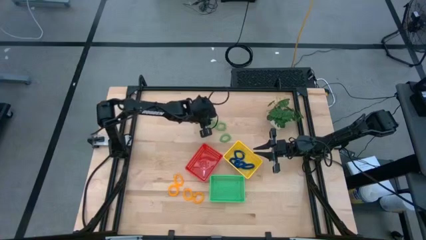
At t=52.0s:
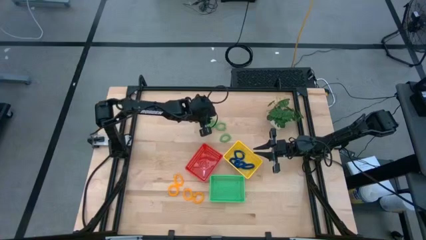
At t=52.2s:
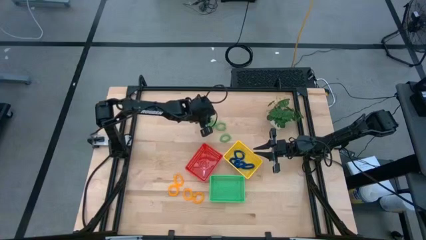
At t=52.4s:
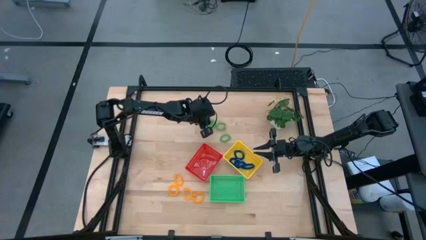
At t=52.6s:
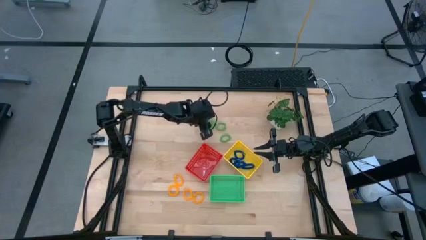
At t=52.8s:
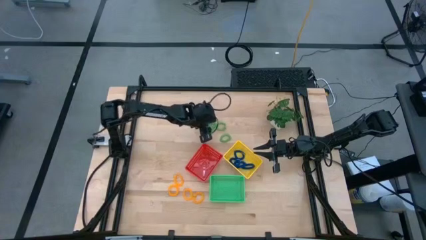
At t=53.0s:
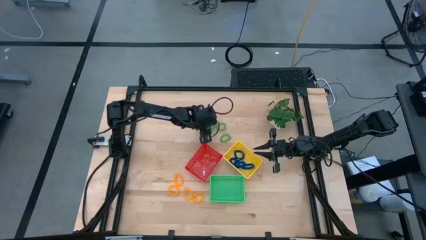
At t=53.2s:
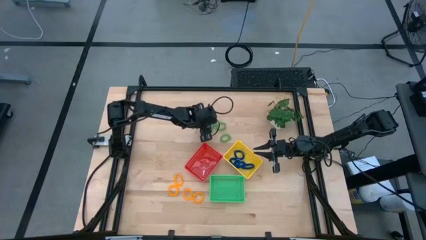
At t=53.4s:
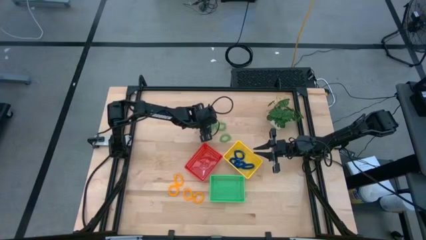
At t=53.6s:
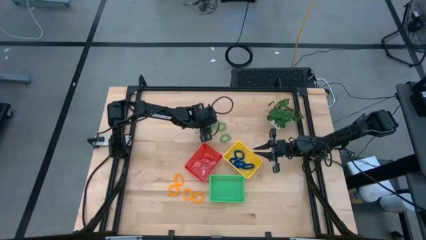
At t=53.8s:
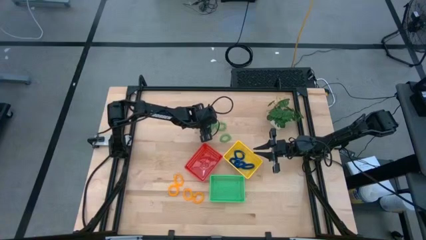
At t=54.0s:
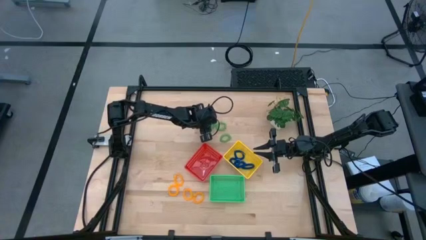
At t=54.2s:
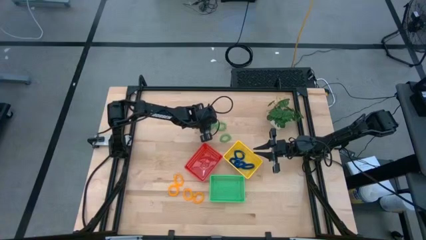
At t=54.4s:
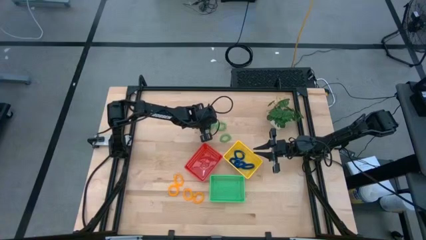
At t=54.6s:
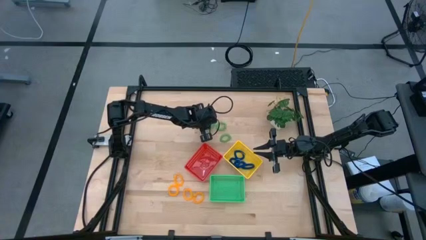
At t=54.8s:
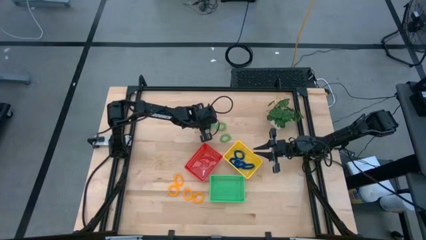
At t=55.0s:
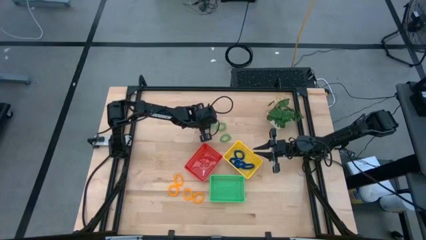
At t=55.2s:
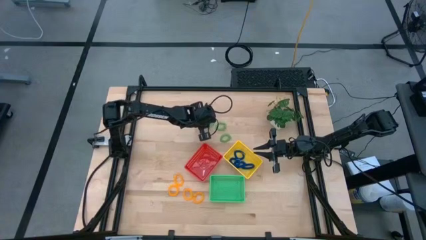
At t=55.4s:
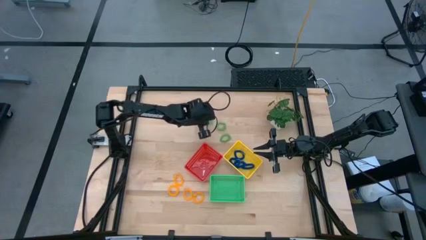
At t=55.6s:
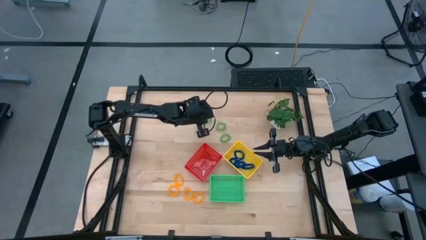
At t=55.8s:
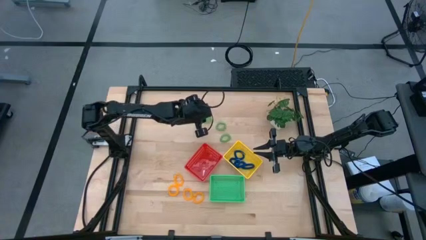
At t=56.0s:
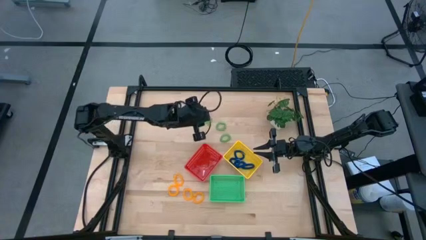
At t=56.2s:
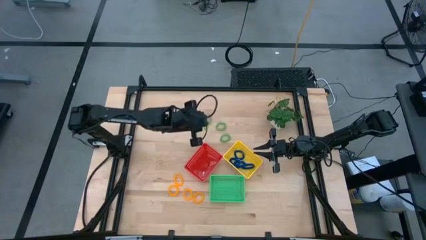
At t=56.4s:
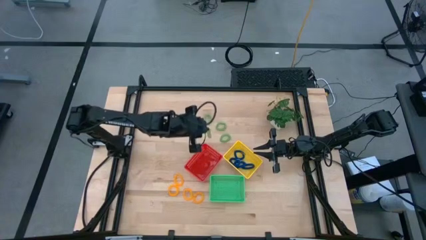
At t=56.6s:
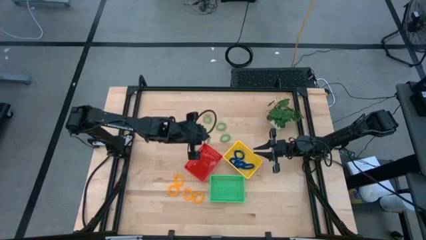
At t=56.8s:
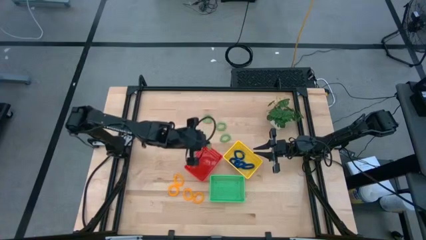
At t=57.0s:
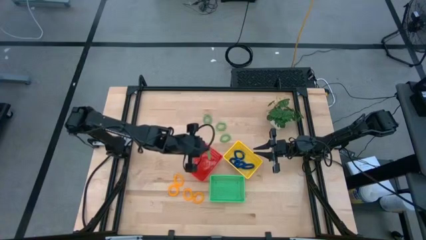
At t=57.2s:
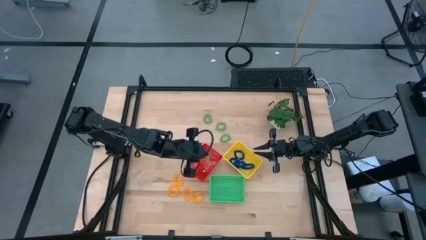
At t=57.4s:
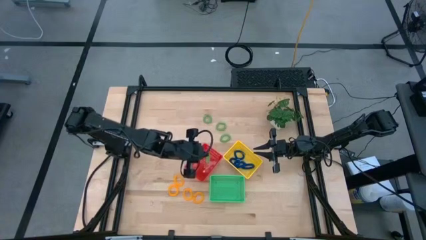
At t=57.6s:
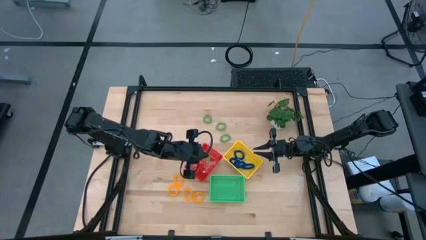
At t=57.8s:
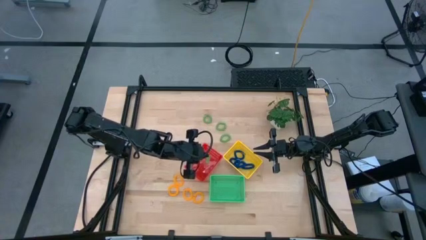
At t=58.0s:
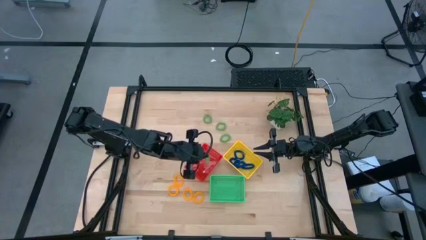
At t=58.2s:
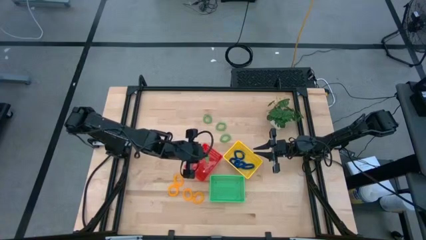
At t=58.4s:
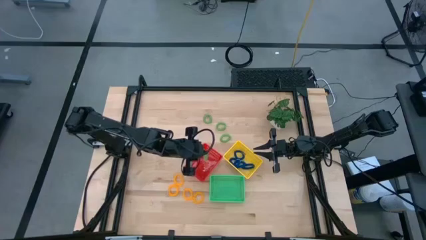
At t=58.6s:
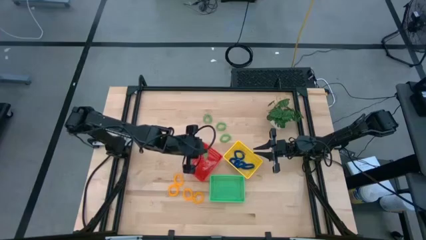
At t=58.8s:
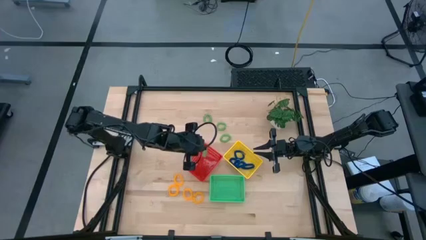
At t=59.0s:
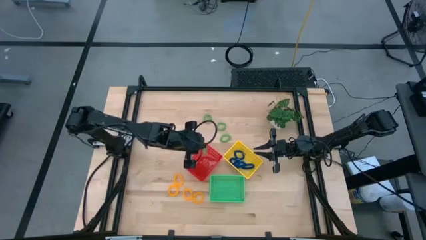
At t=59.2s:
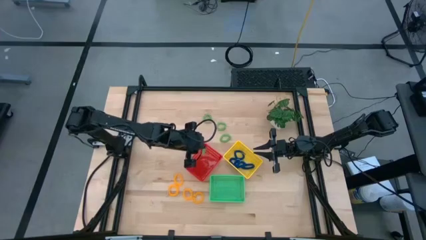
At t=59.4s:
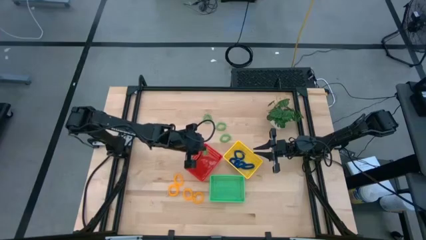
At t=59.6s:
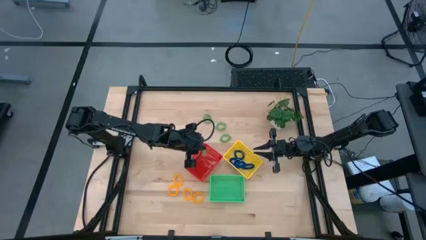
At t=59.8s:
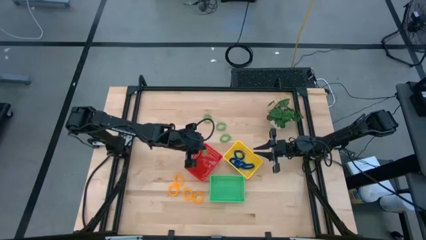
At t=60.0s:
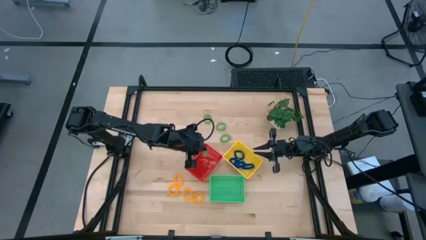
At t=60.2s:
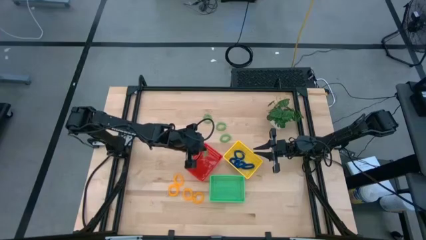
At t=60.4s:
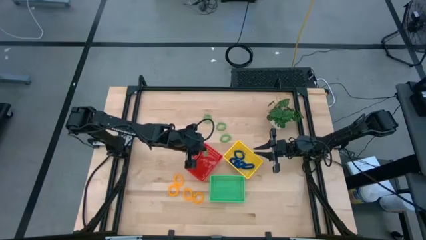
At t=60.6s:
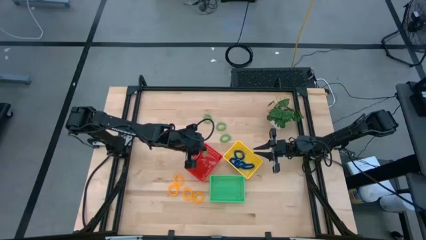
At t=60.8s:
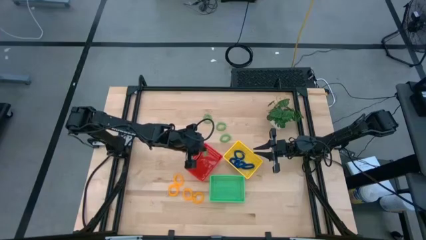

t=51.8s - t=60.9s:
Task: Sort spring keychains
Put the green spring keychain into the red bin

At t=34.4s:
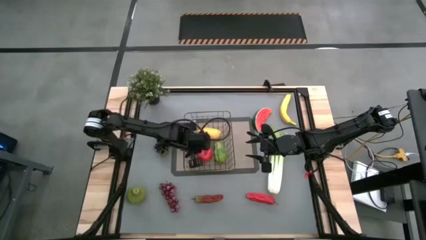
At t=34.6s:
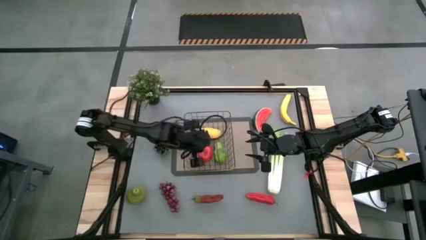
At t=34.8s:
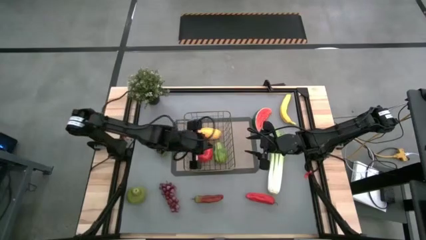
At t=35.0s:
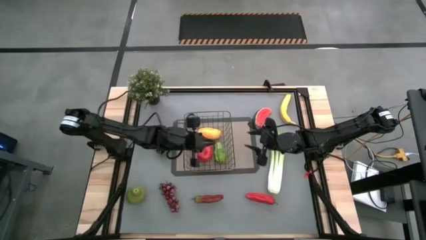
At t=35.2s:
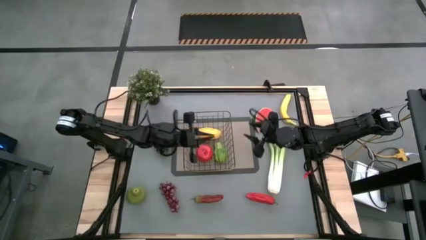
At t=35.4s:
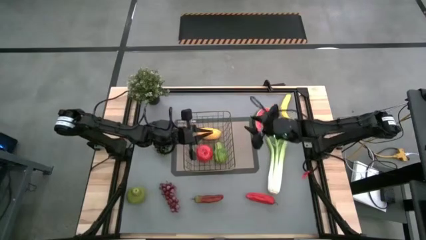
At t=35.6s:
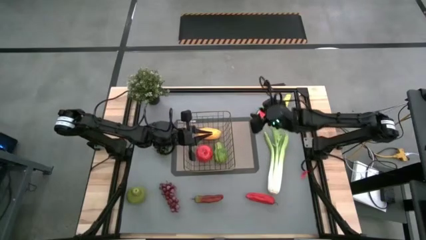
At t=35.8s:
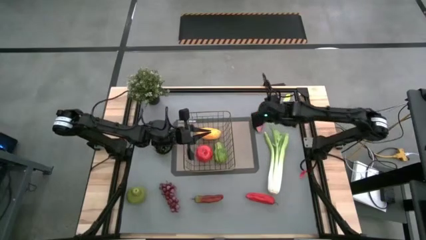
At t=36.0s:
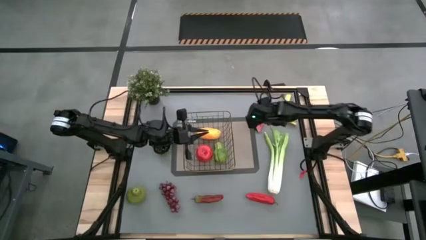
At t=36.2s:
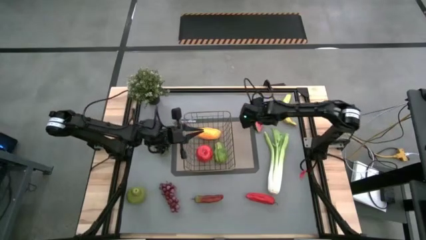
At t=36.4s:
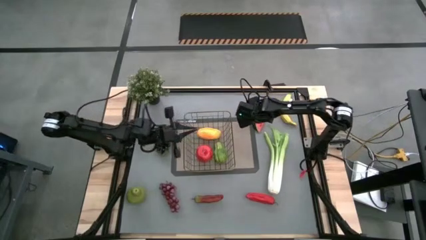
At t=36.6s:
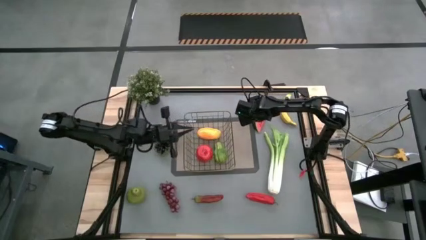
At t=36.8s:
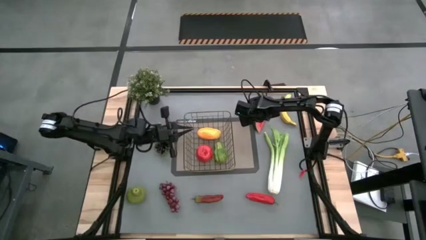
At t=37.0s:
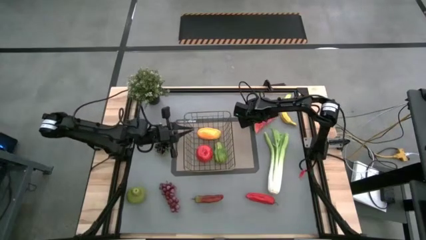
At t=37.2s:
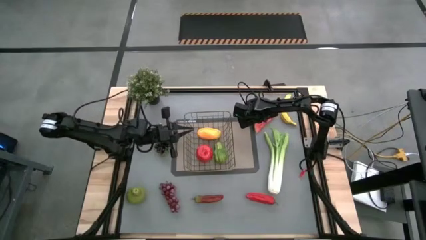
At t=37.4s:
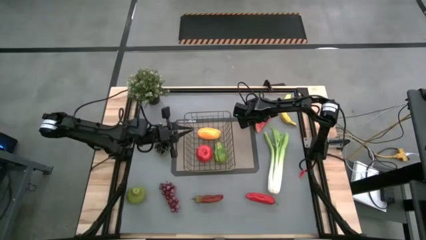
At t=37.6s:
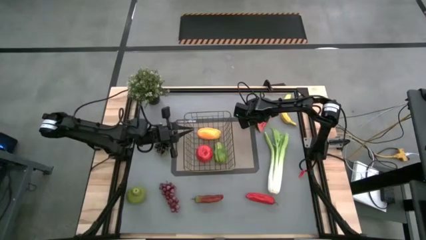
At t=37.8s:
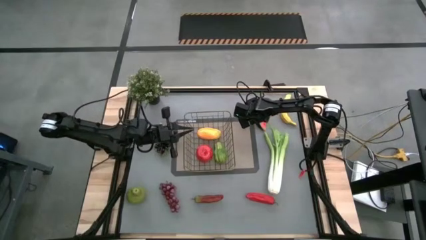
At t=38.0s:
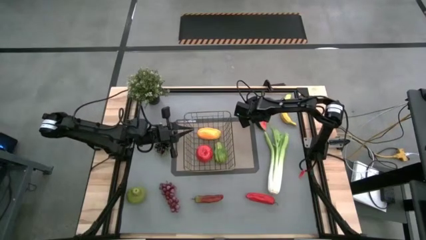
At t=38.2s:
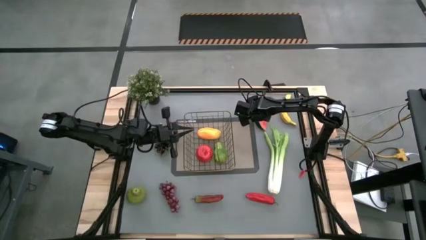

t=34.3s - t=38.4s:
Task: Build produce basket
Put the green watermelon into the wire basket

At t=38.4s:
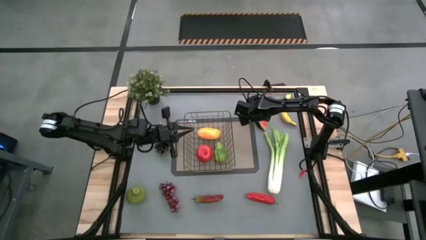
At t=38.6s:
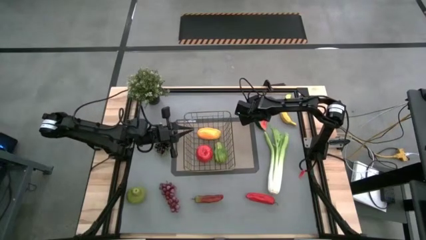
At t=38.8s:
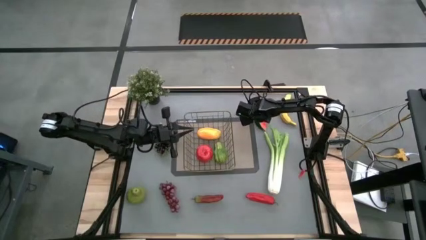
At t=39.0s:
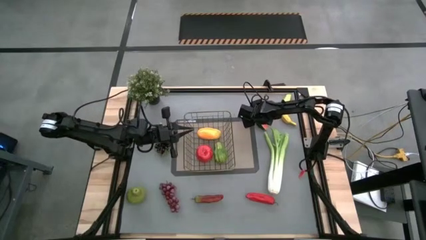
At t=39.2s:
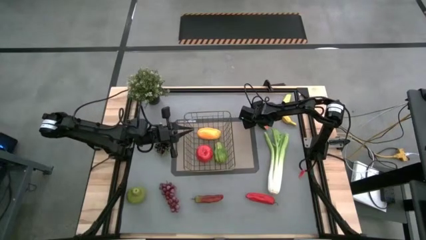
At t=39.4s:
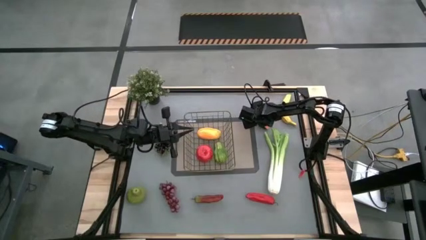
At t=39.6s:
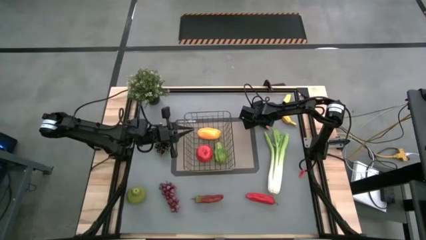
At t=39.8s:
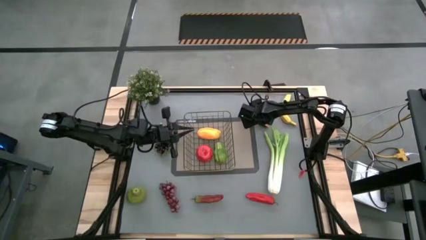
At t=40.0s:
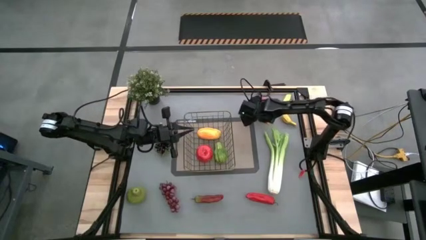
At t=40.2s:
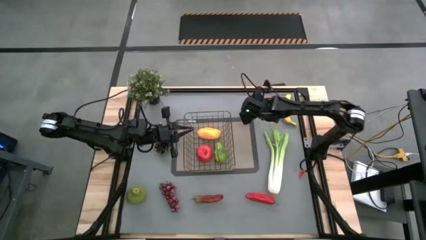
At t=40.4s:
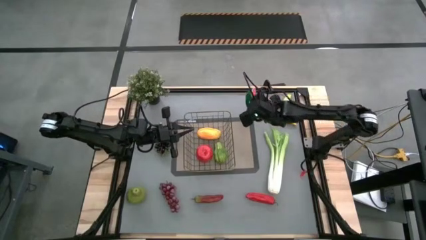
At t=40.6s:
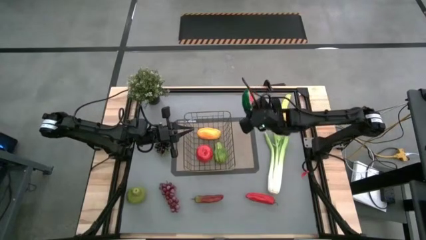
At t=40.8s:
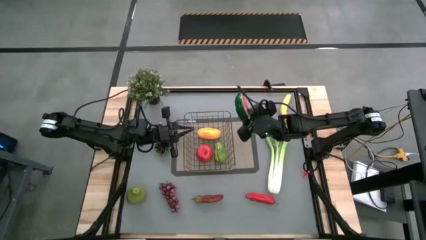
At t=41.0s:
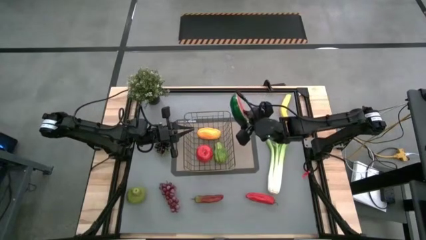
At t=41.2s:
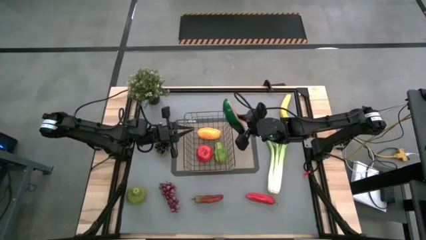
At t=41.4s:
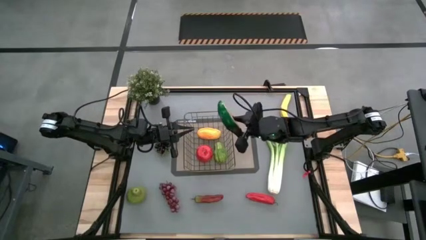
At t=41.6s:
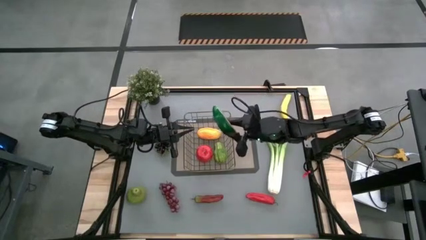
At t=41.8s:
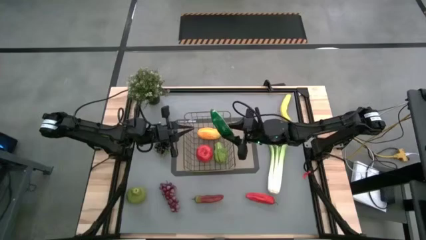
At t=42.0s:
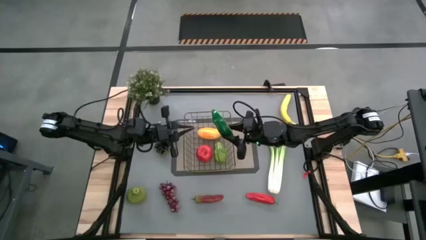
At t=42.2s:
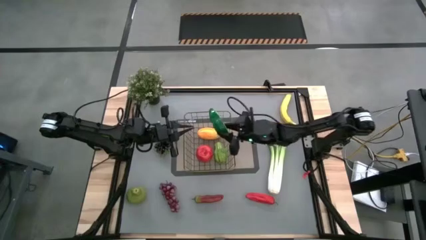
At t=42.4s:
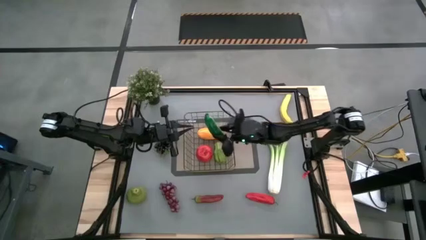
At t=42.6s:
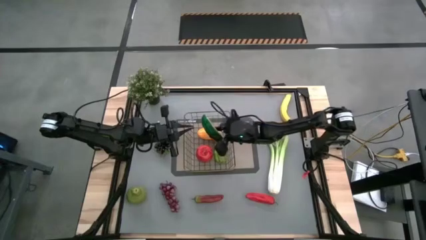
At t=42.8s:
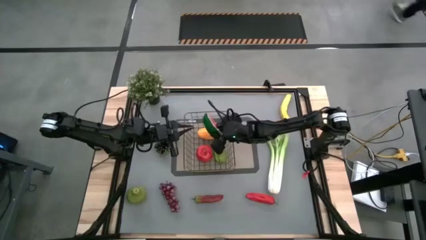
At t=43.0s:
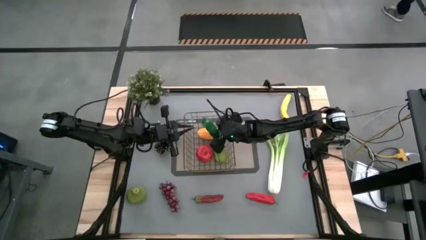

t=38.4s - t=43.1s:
Put the green watermelon into the wire basket
